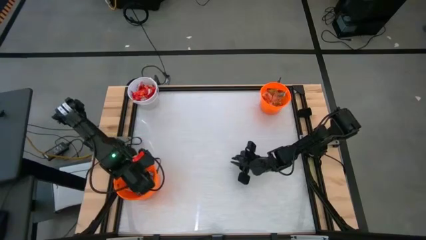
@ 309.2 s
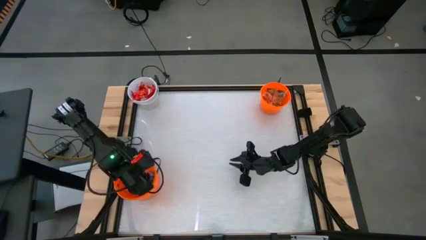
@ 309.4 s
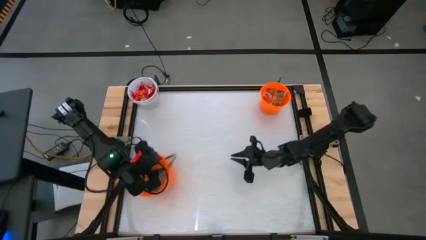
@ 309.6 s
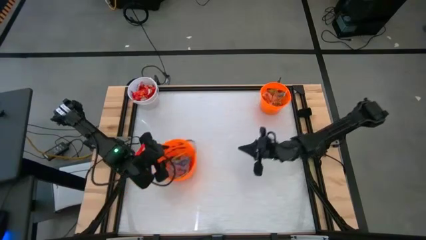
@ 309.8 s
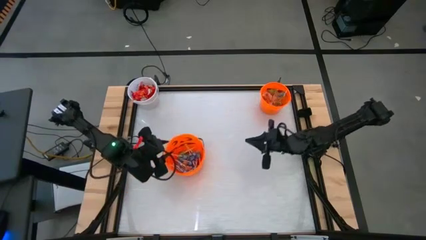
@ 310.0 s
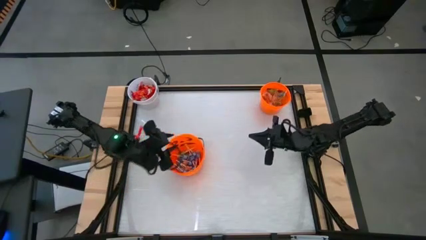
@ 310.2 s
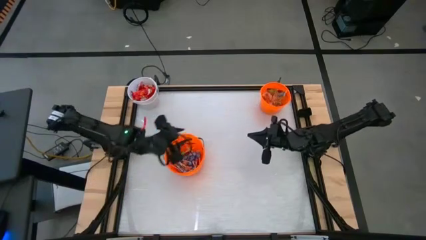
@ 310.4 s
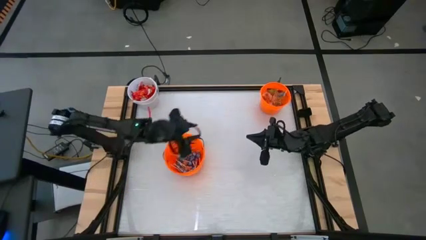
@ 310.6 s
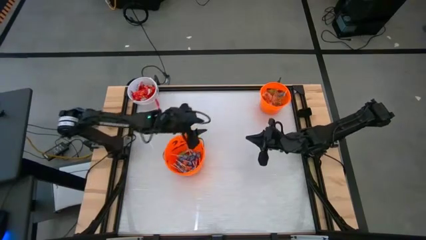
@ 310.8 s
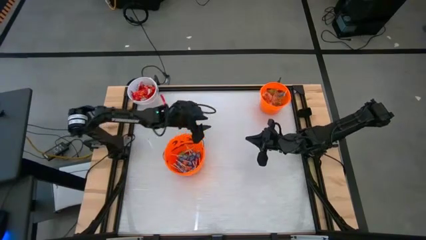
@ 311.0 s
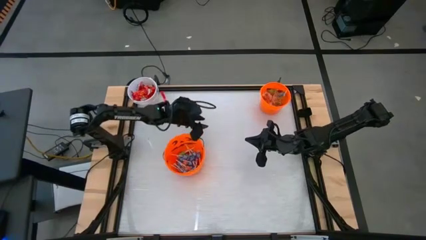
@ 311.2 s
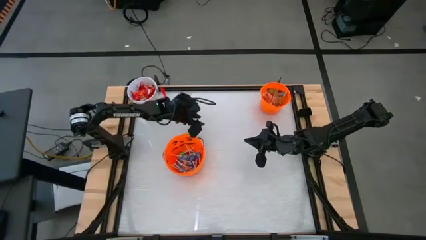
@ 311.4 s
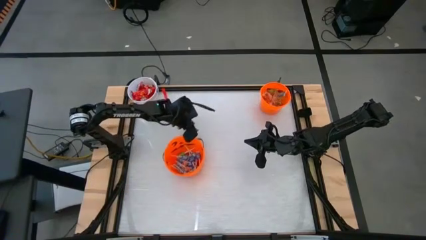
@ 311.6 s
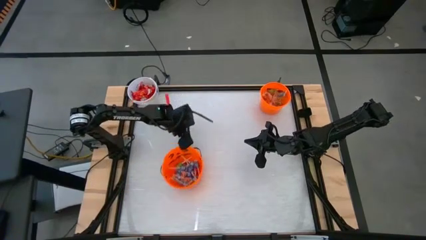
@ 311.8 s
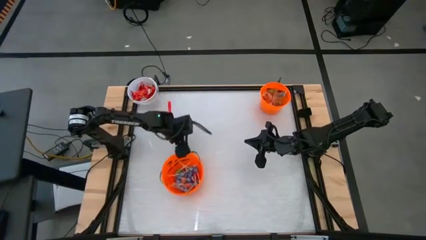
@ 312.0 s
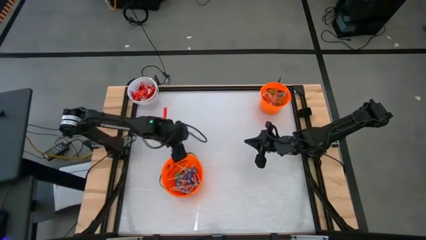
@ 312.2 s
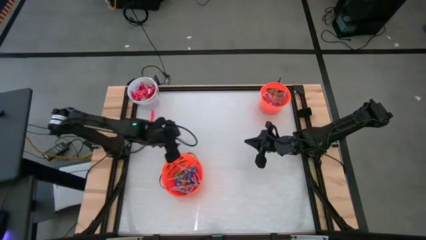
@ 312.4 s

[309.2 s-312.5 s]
Task: Sort candy by brand, put in halloween buckets
Adjust the bottom orange bucket to the center of the table

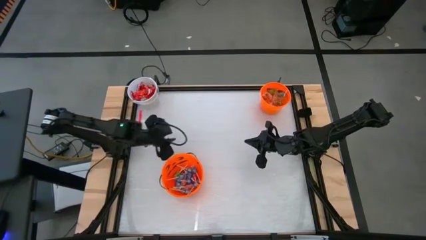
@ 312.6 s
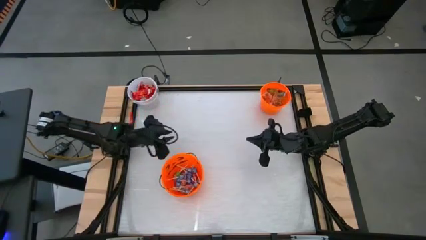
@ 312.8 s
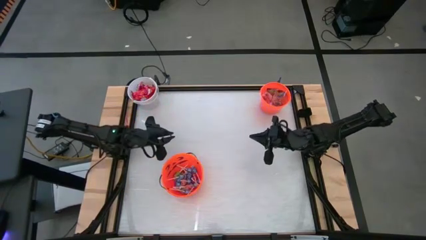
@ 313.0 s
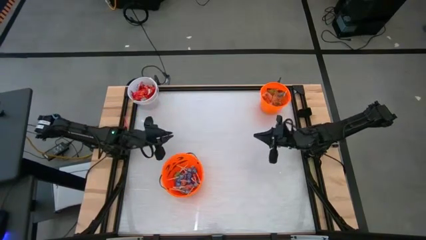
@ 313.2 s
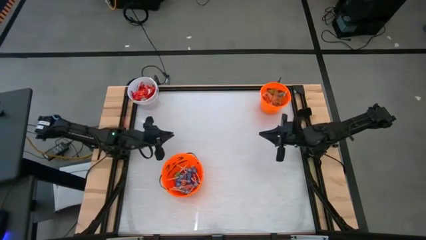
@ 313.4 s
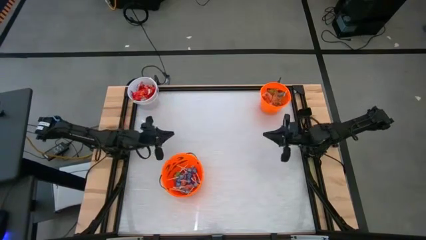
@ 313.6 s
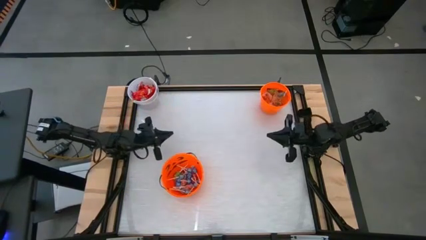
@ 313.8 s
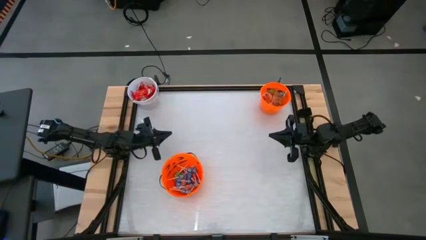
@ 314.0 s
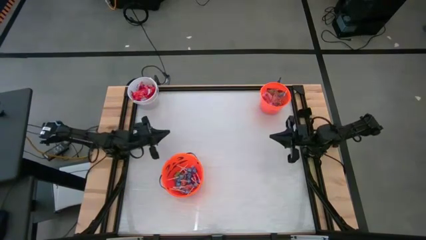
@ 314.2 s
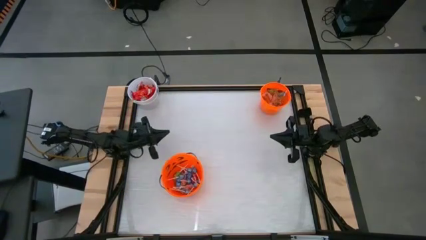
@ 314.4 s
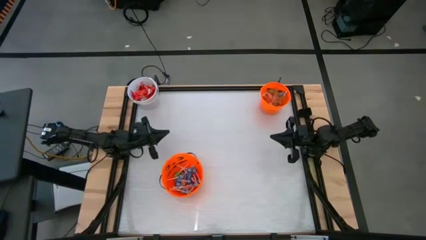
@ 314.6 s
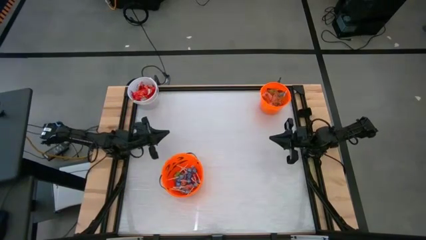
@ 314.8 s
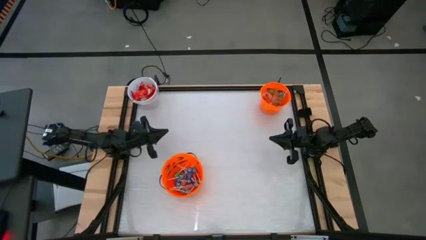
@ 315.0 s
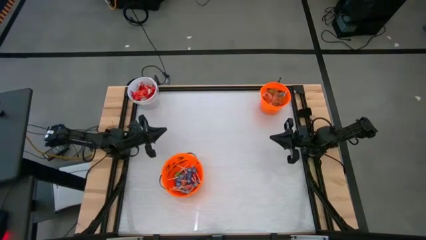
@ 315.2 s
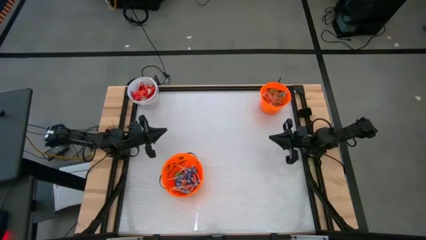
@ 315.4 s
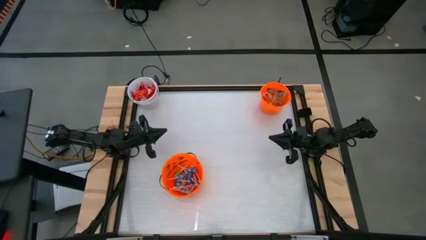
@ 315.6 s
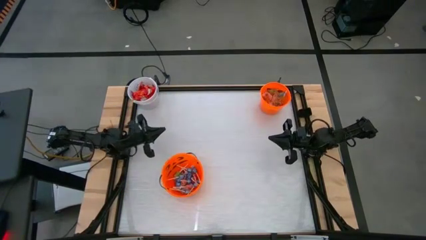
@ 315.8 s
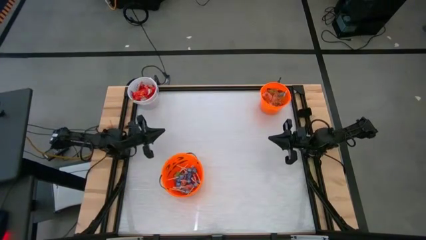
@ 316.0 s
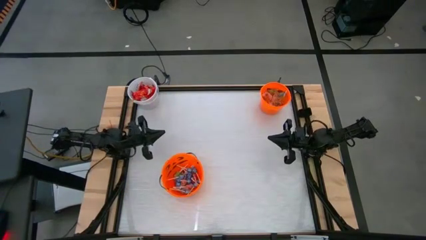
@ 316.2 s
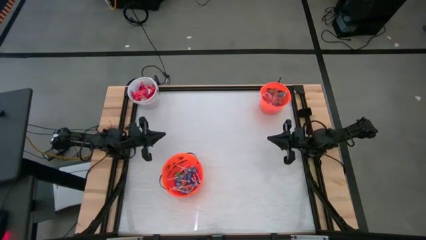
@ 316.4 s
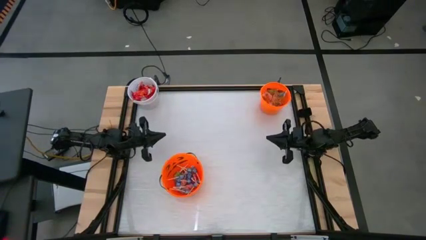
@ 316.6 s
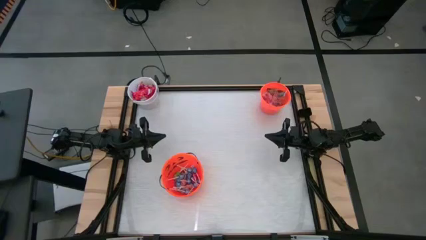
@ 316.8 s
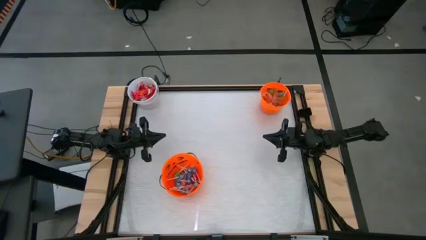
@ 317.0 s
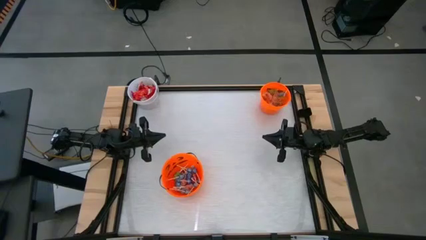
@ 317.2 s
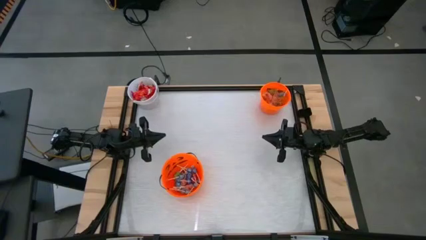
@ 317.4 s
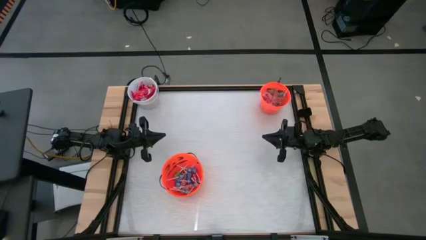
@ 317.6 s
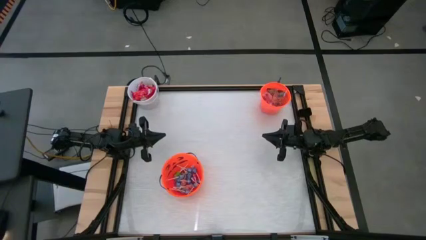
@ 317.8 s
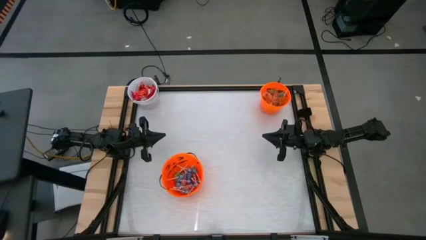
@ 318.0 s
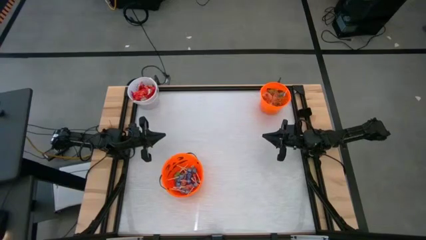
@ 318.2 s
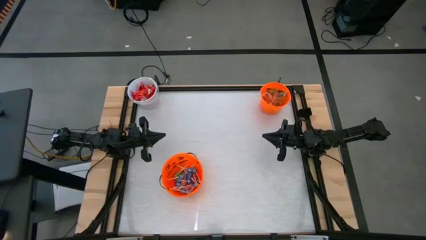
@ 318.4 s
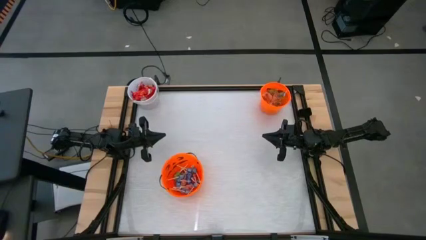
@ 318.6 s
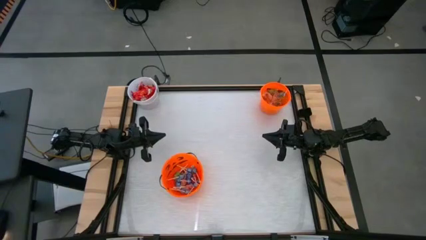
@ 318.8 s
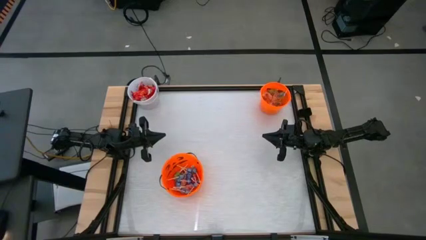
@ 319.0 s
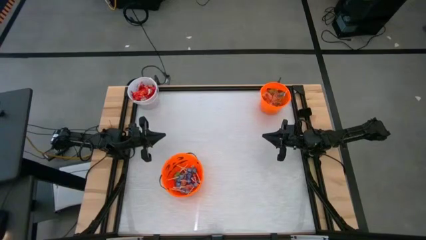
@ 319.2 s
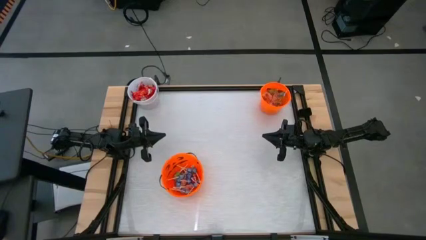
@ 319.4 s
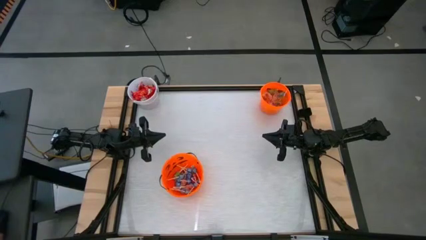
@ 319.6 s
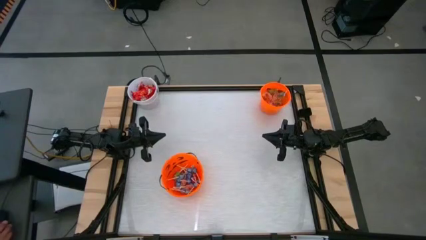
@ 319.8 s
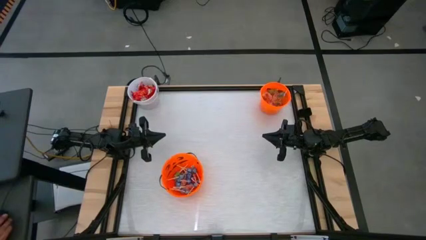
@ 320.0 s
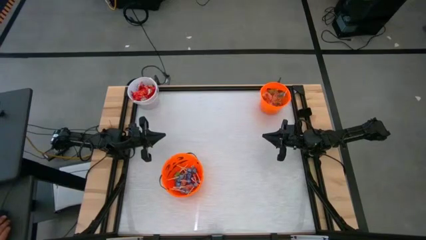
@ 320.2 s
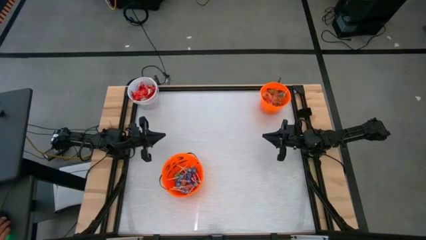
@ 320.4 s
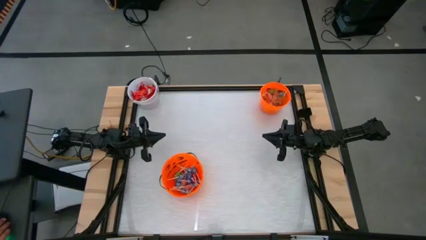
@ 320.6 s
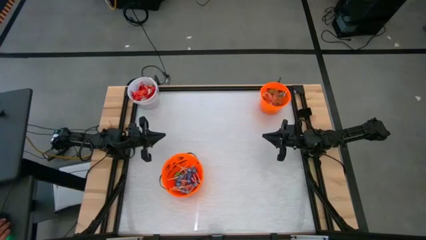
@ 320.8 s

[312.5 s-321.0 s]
Return to Home Position

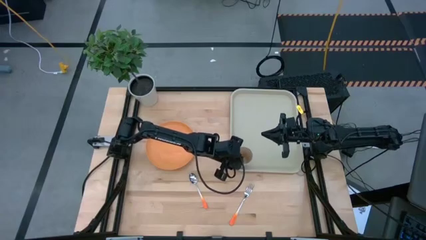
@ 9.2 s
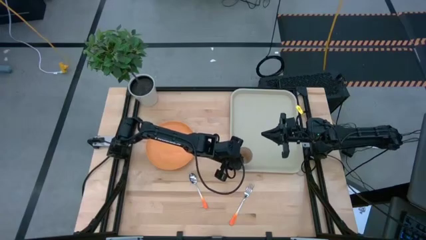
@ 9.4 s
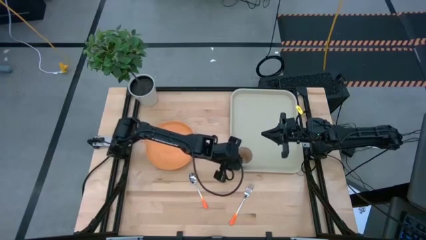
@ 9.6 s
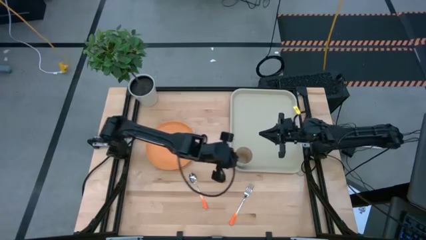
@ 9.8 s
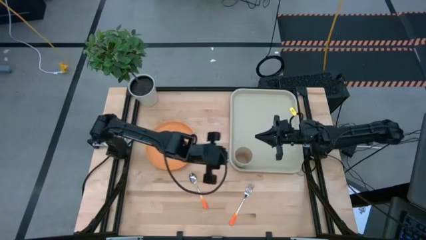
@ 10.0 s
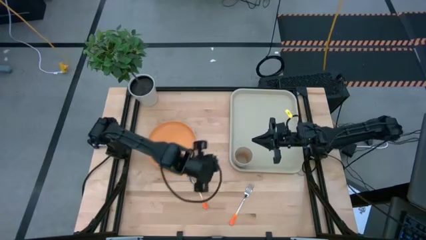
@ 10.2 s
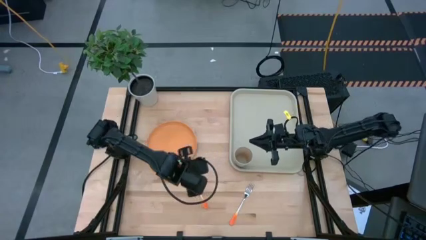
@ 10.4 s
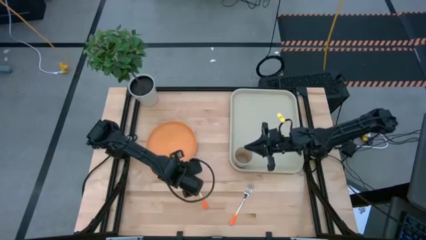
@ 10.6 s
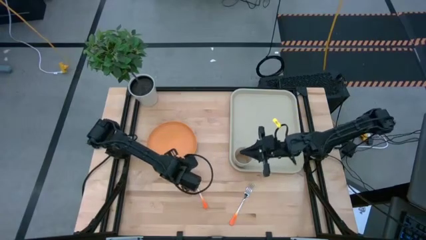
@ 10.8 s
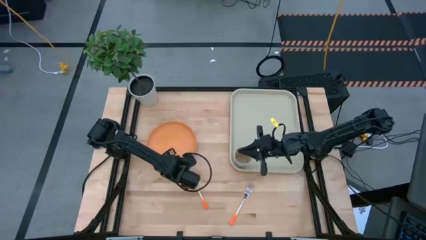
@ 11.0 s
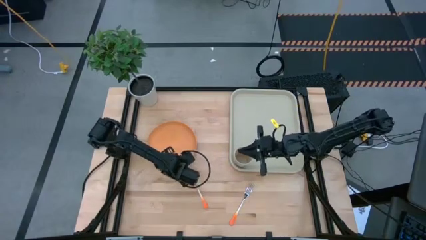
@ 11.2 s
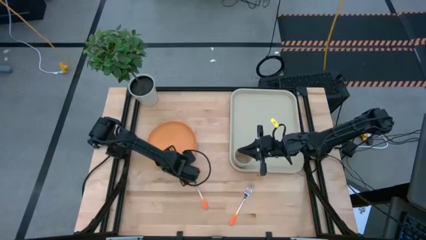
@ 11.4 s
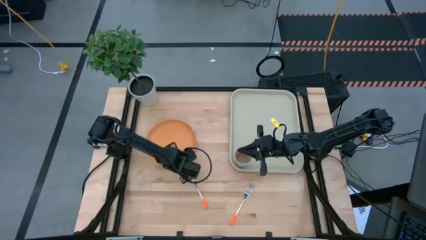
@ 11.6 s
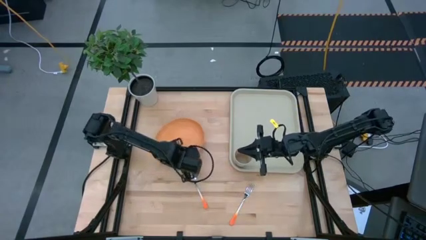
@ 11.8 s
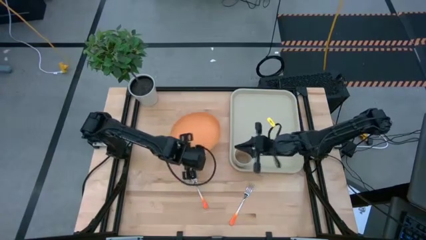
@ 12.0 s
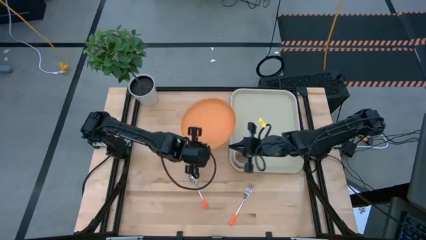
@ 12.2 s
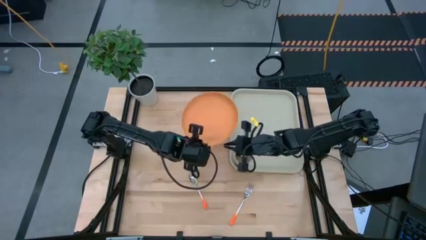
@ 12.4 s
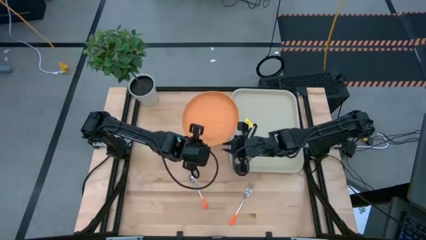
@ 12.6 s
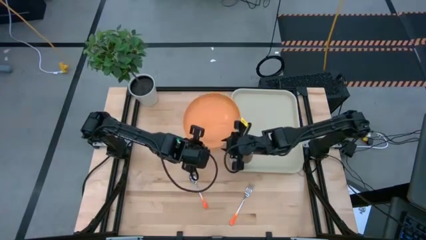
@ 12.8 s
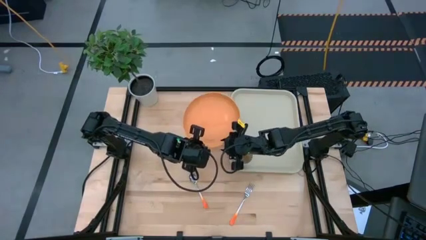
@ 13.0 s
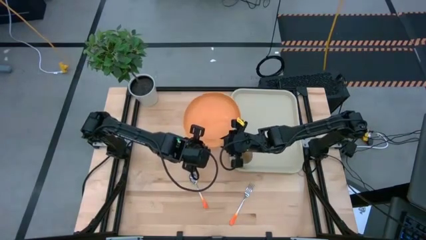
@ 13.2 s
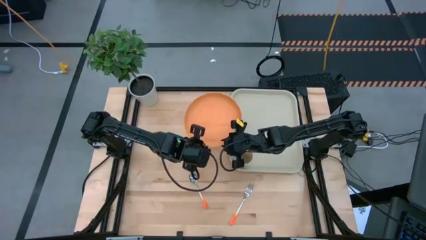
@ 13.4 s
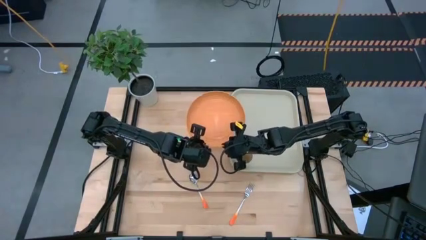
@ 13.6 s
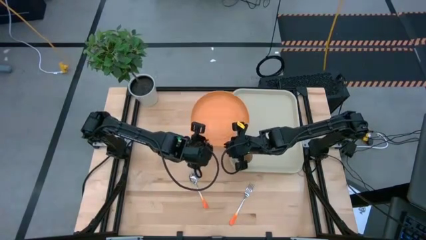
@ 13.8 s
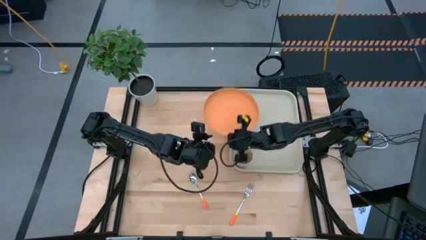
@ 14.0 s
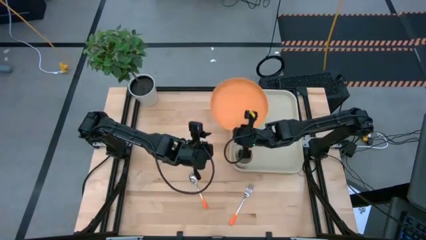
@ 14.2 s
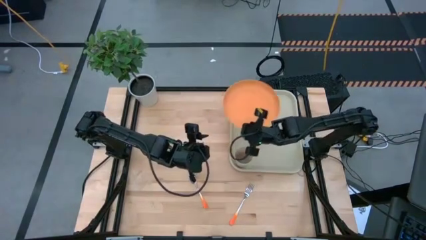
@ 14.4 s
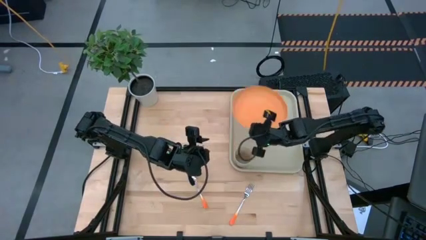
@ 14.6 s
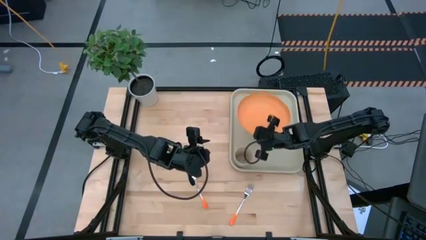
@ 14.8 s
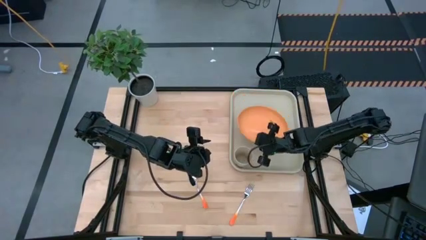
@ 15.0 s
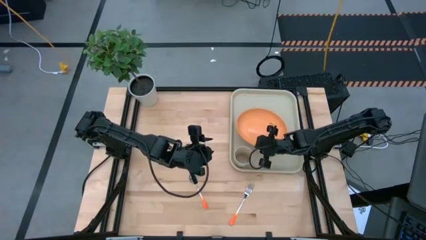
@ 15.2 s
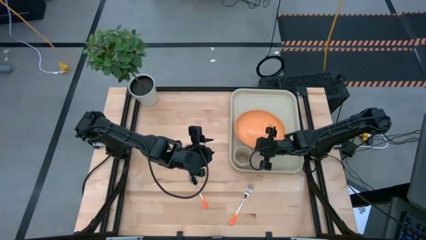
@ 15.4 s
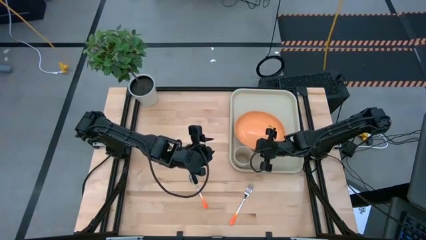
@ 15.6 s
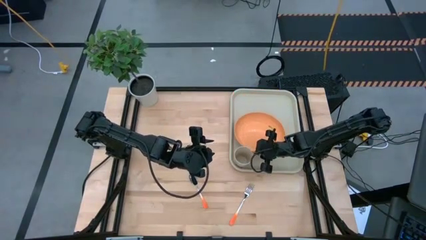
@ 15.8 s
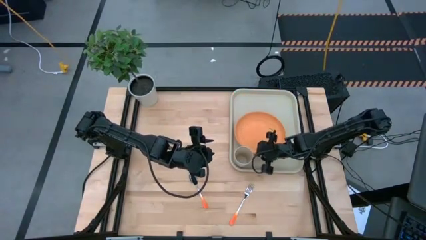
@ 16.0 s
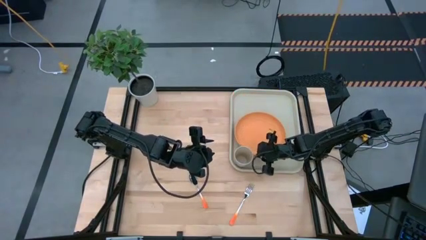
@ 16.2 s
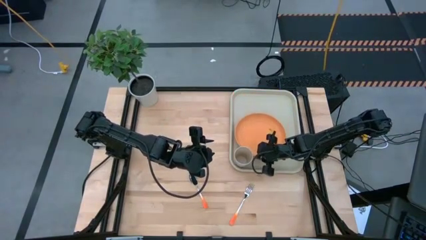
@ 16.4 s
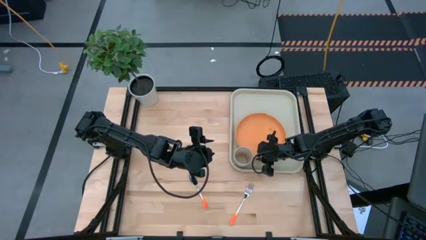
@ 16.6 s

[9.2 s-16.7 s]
Task: Pick and place plate/cup/fork/spoon on tray
Put the orange plate on the gray tray to the top of the gray cup
